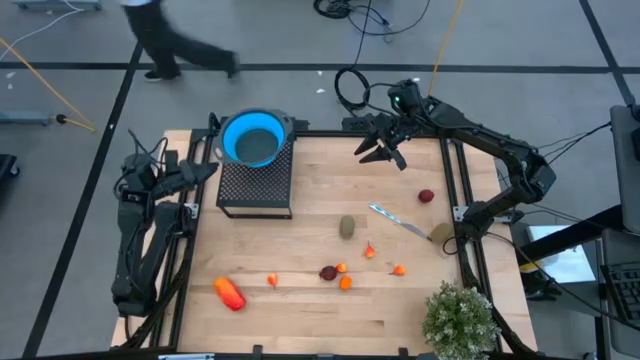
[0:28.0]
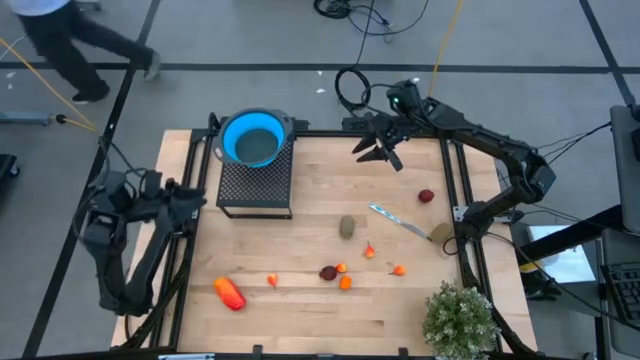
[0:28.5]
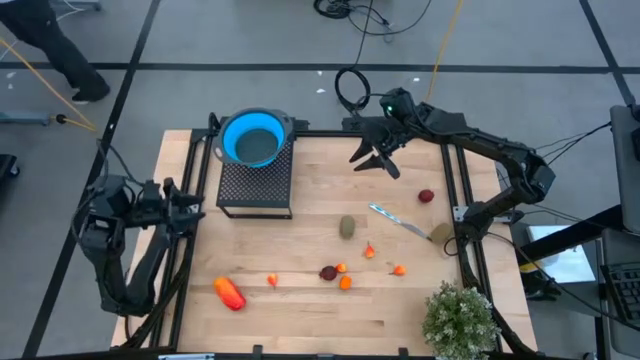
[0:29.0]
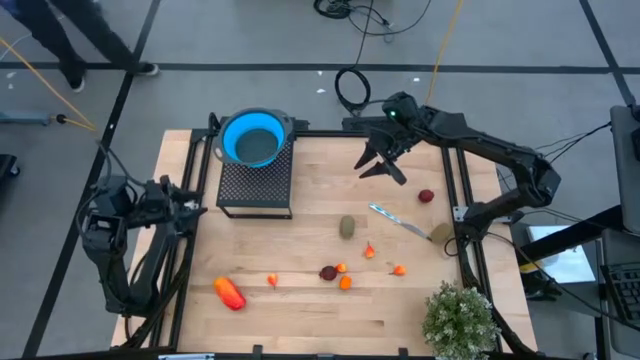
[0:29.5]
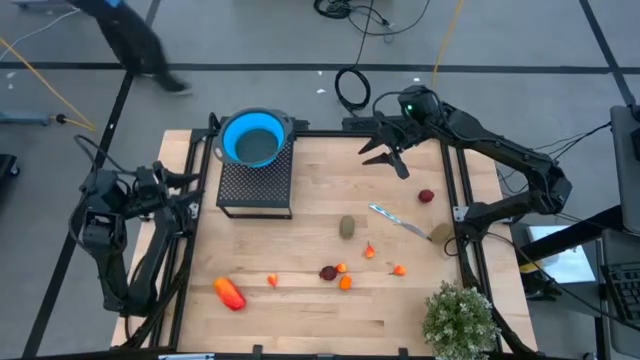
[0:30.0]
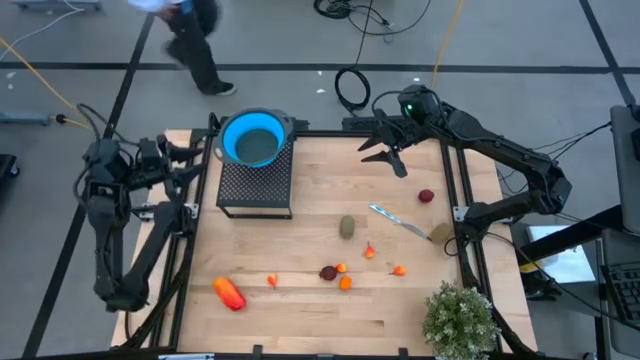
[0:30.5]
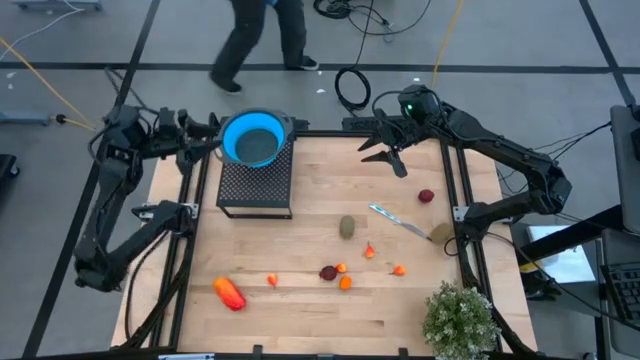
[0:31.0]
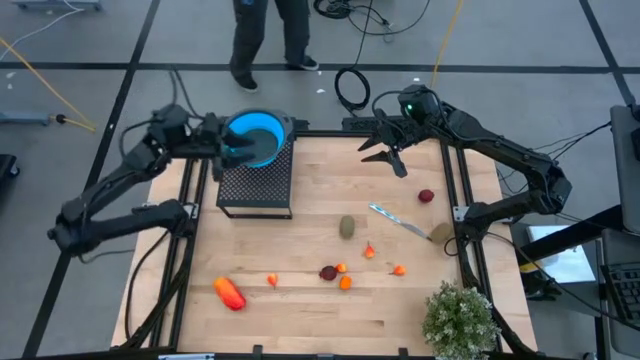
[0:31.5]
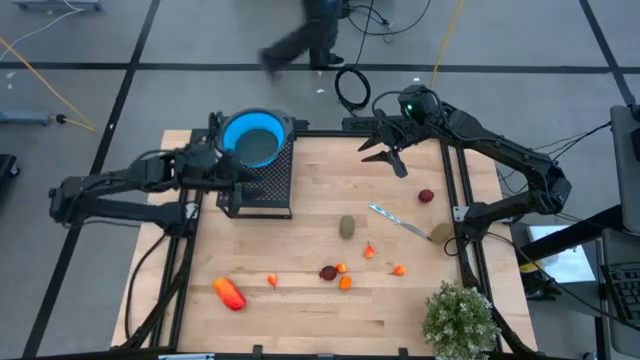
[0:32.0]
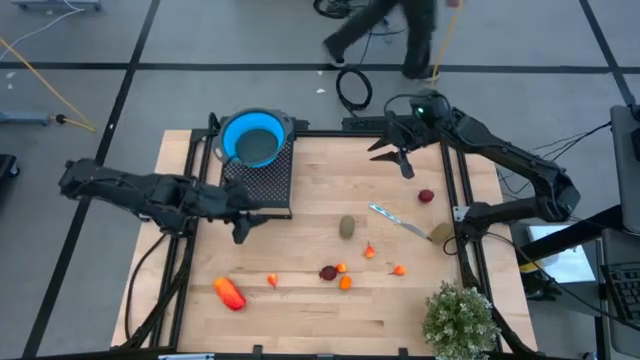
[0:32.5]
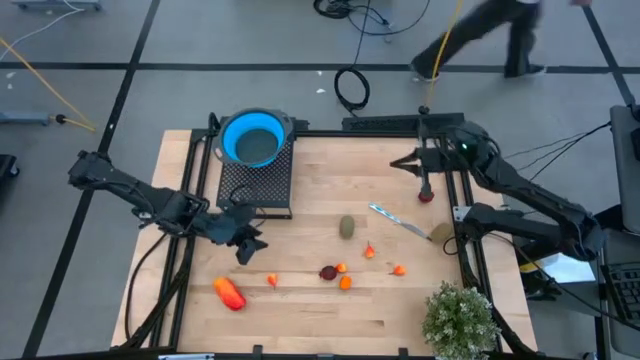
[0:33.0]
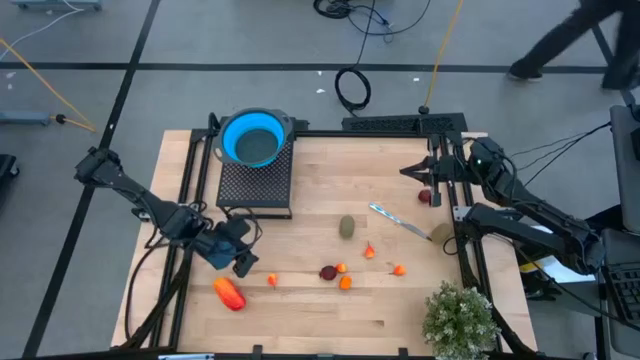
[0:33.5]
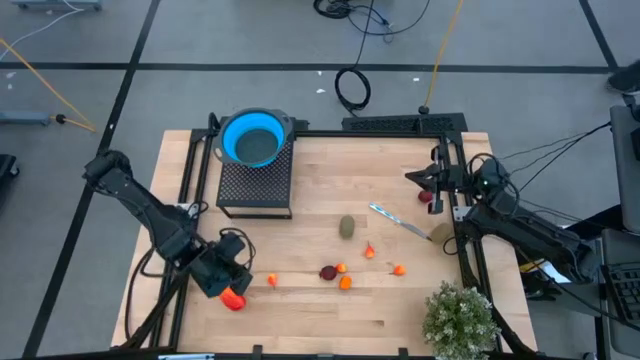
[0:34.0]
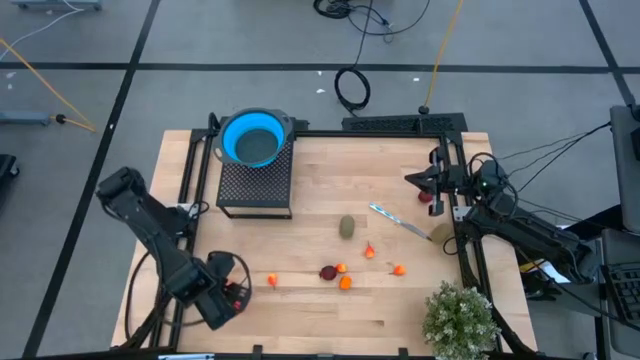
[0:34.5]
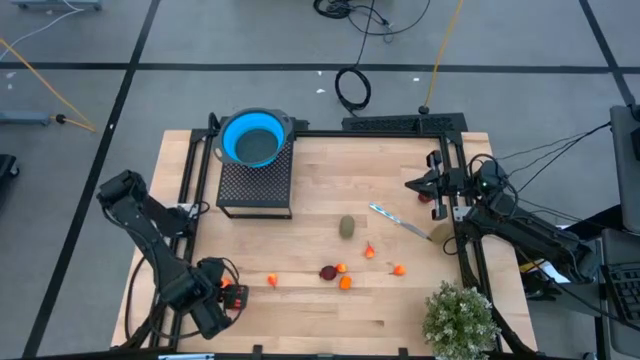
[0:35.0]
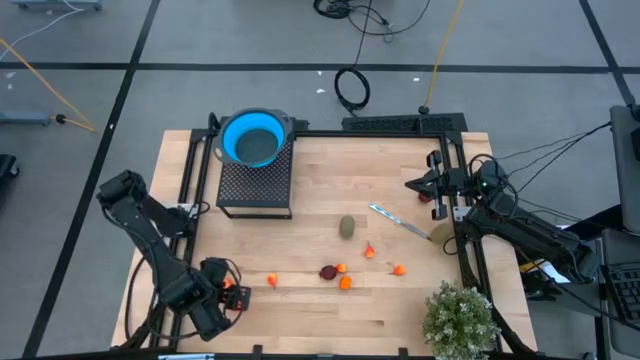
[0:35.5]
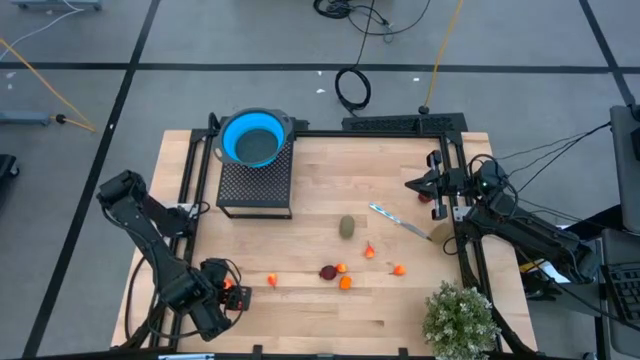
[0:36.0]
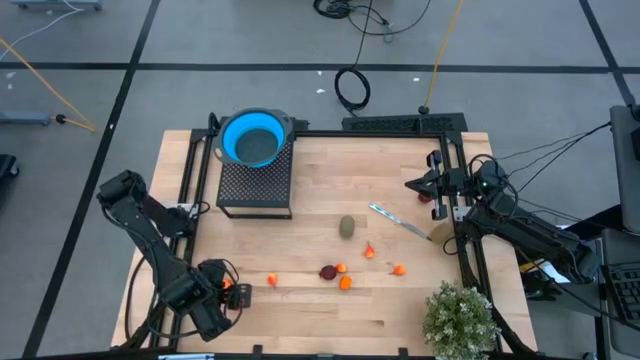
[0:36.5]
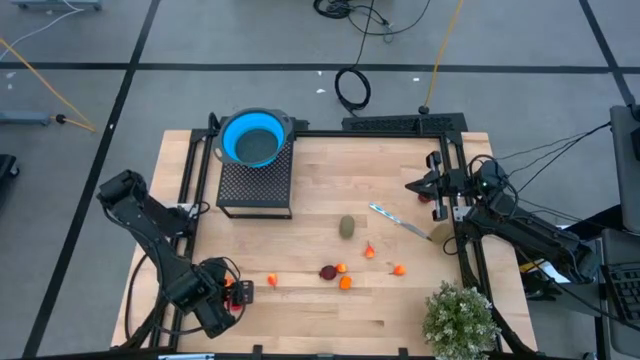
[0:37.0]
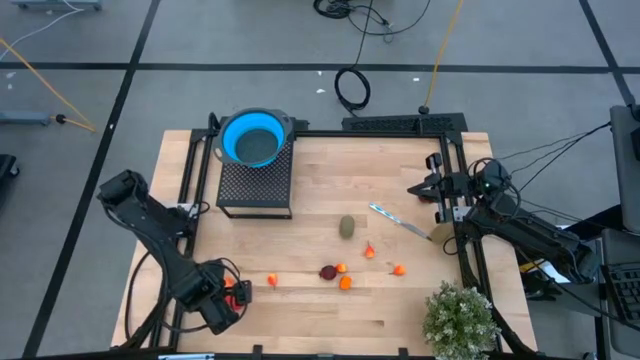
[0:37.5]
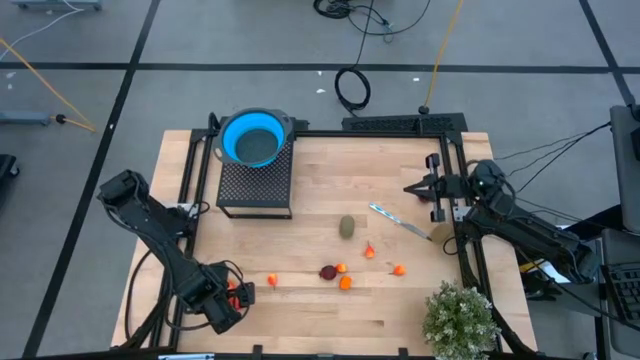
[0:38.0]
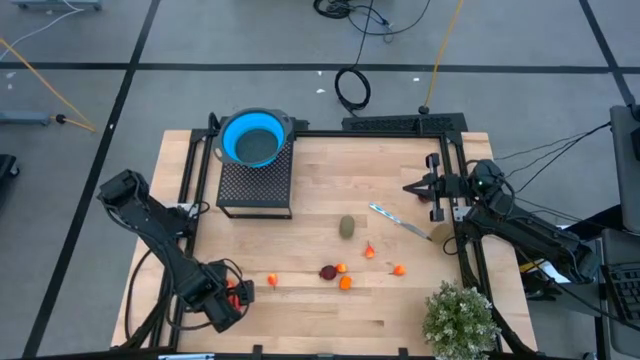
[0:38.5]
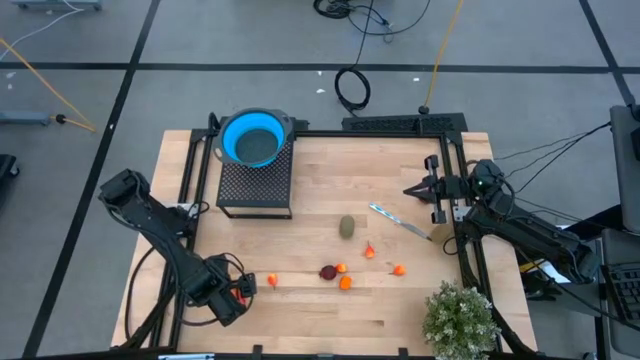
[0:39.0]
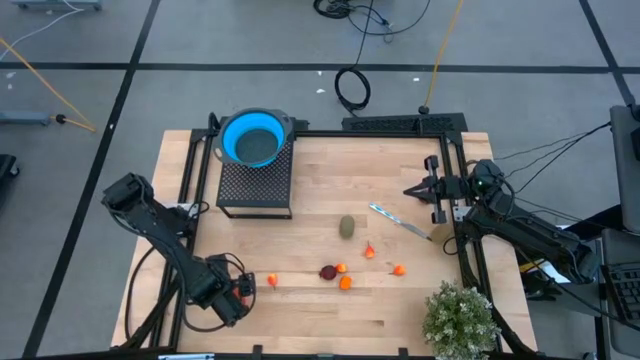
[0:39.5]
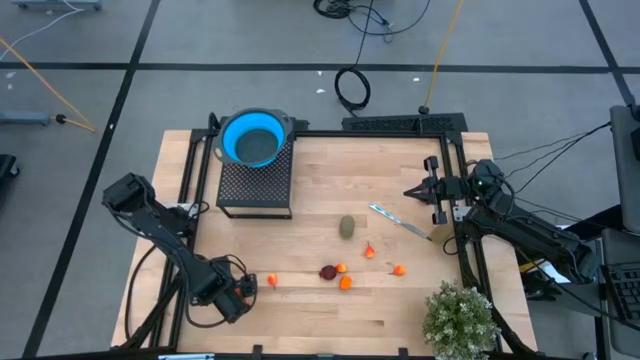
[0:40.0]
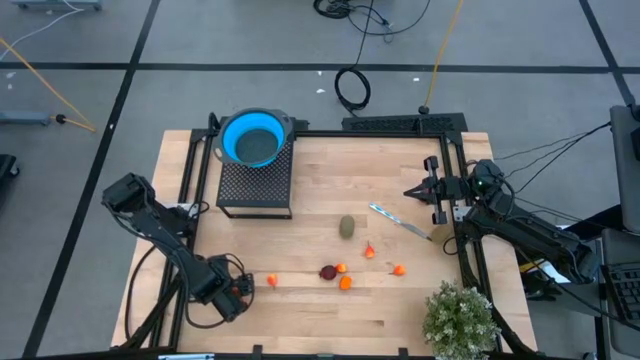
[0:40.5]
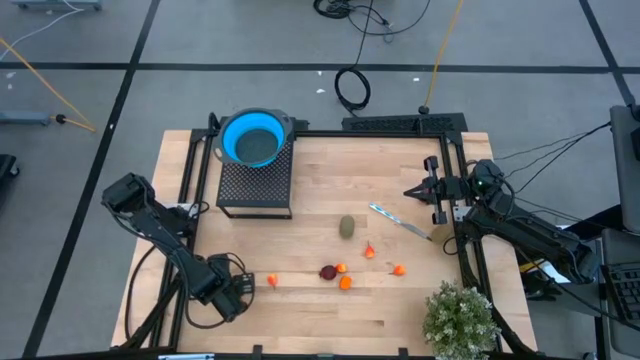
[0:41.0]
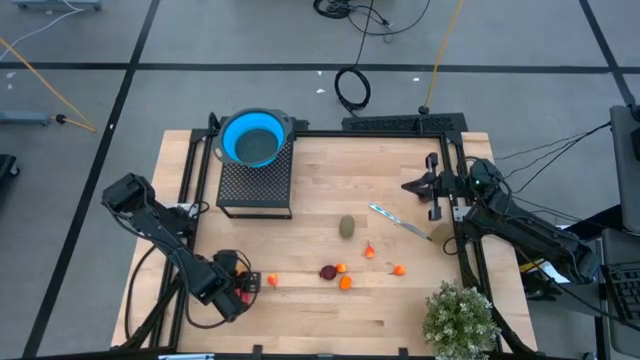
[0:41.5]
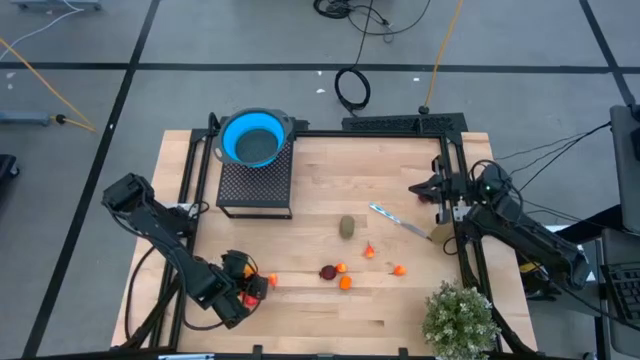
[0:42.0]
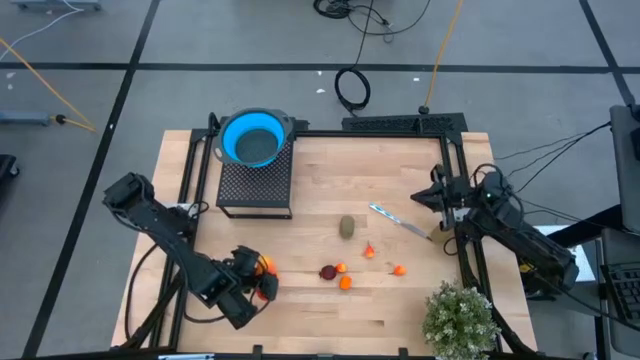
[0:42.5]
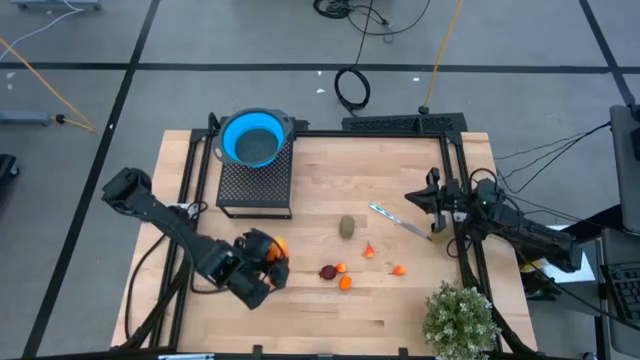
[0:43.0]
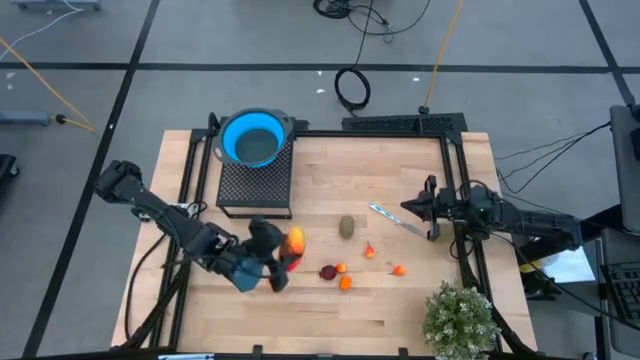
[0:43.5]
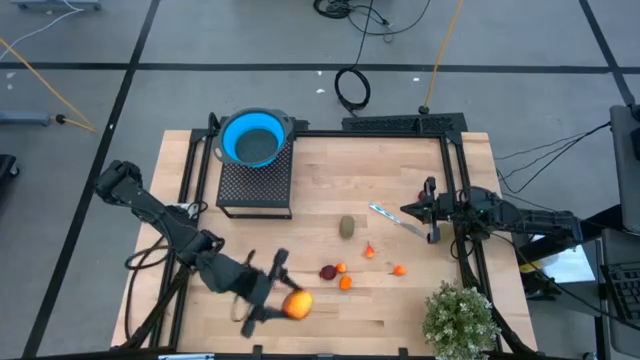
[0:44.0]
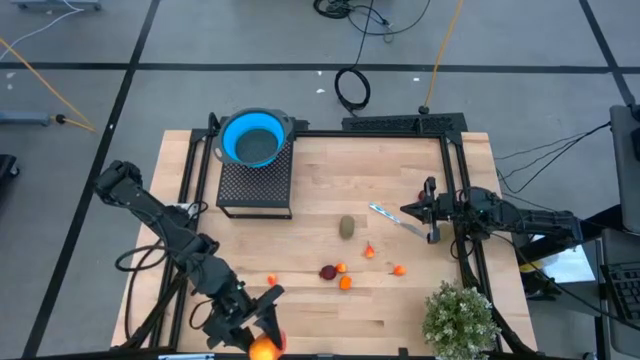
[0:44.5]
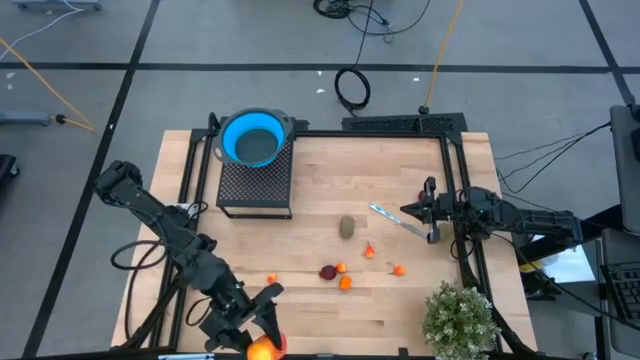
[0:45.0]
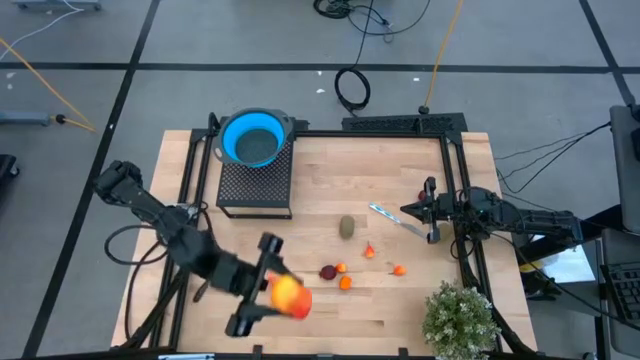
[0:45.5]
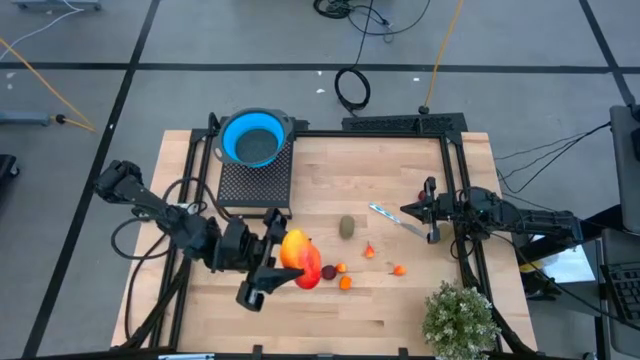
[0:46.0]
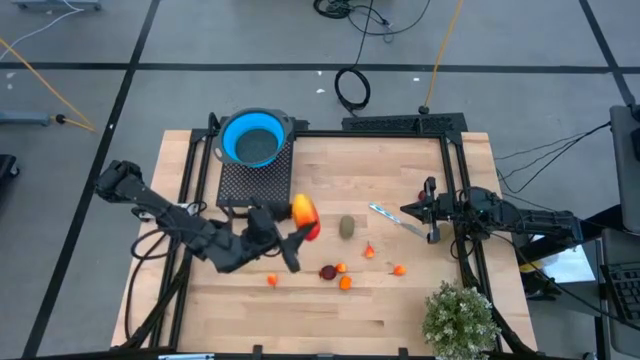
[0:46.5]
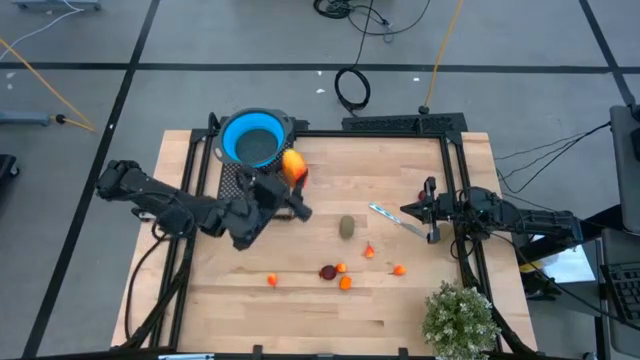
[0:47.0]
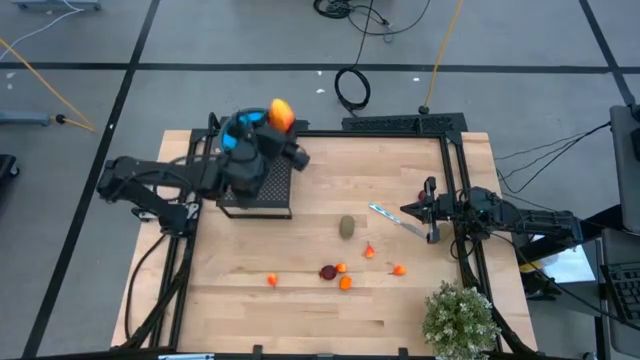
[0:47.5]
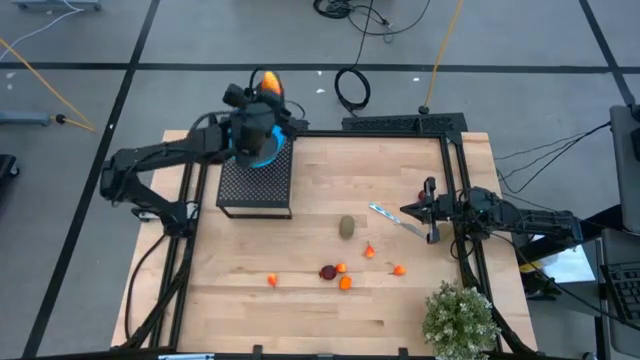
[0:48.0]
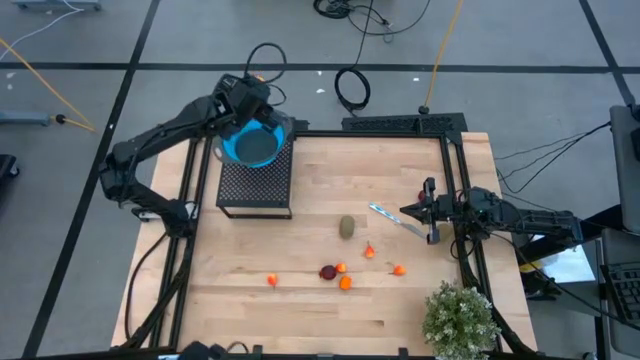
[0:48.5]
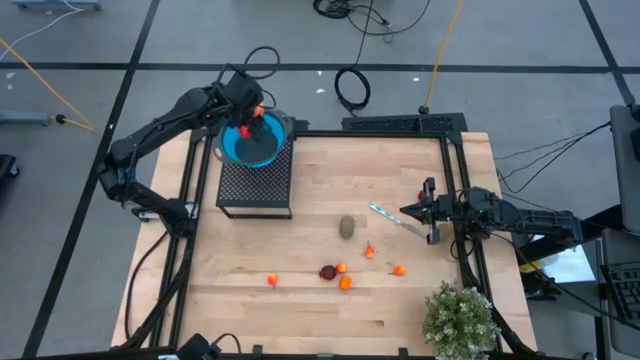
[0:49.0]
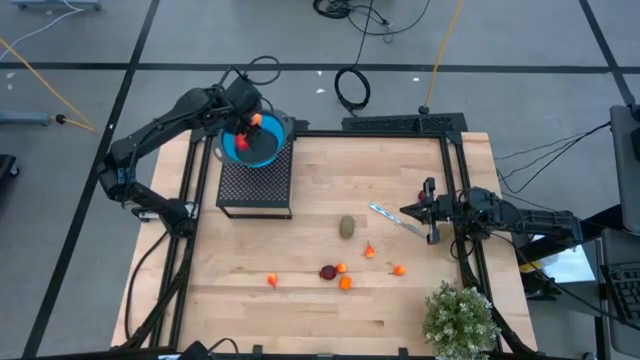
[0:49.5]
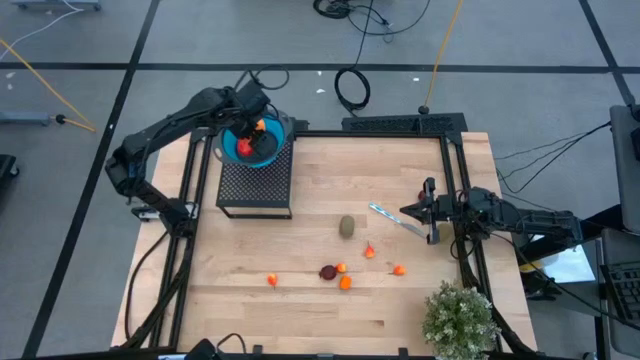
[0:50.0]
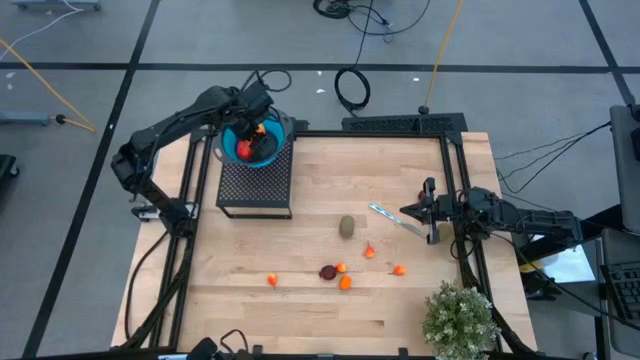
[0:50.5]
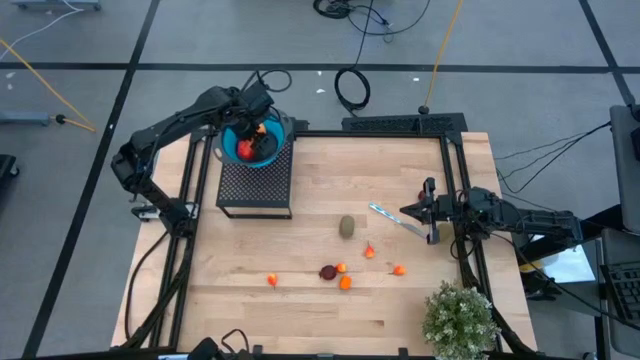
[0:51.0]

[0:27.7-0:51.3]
Task: Pick & Place Fruit
Put the orange mango into the blue strainer bowl on the shelf
